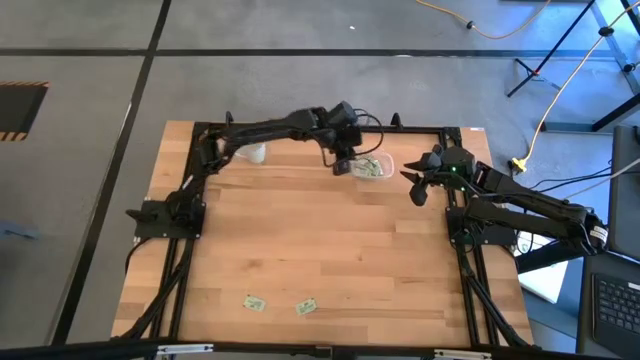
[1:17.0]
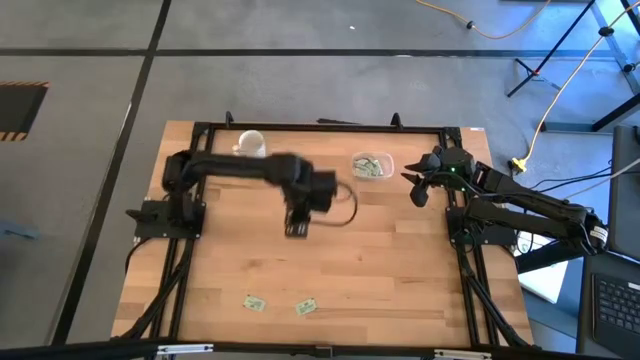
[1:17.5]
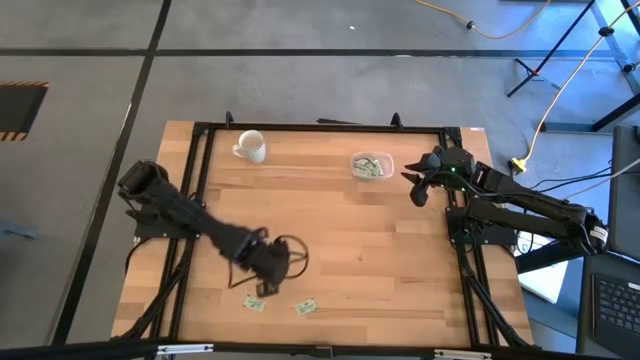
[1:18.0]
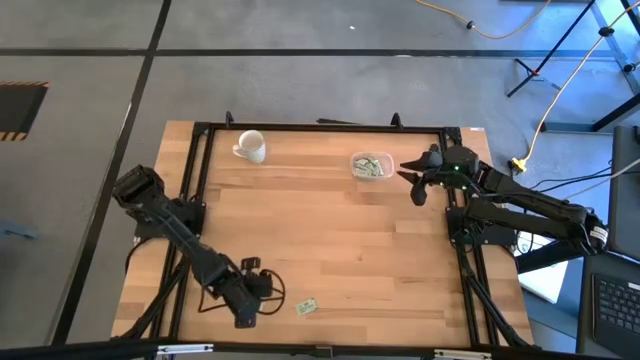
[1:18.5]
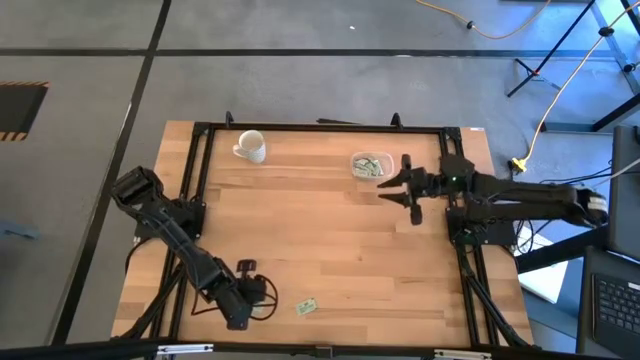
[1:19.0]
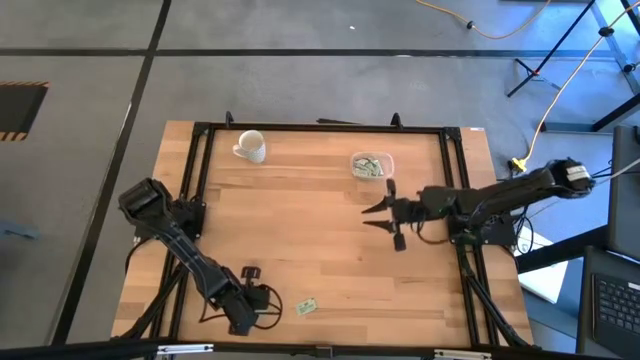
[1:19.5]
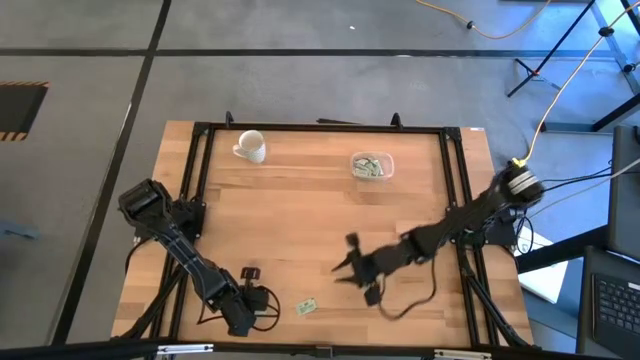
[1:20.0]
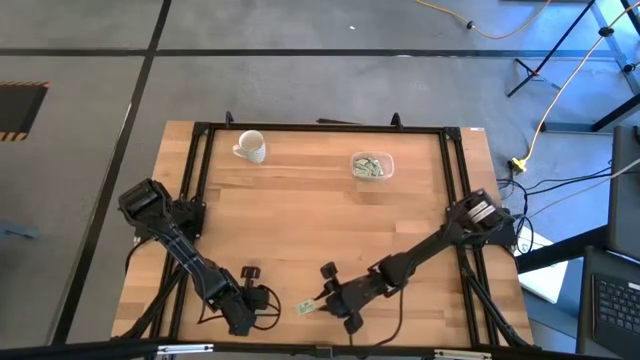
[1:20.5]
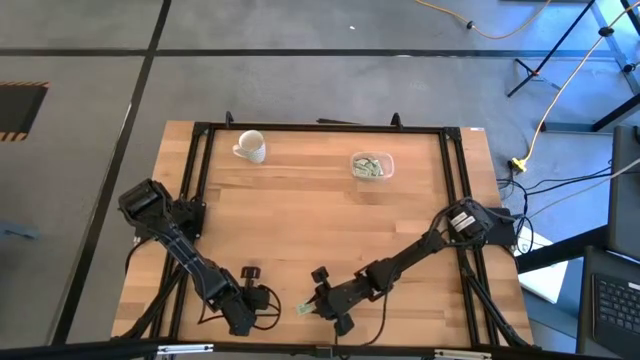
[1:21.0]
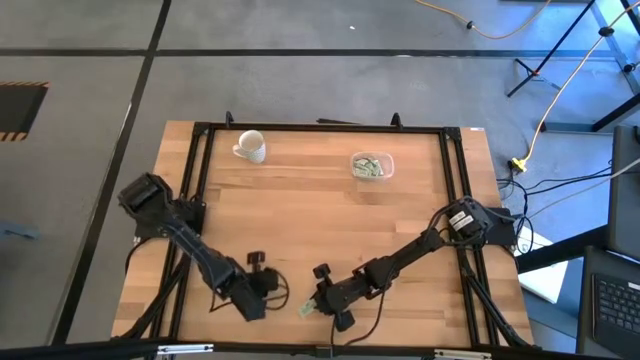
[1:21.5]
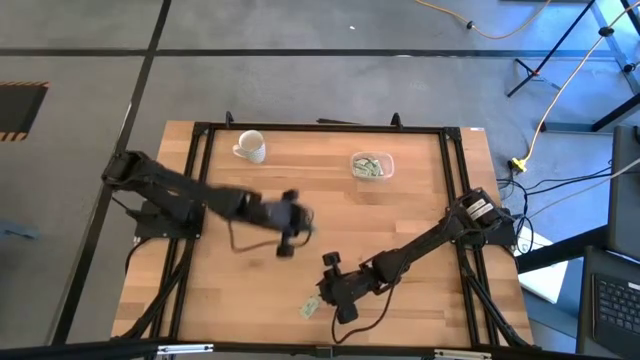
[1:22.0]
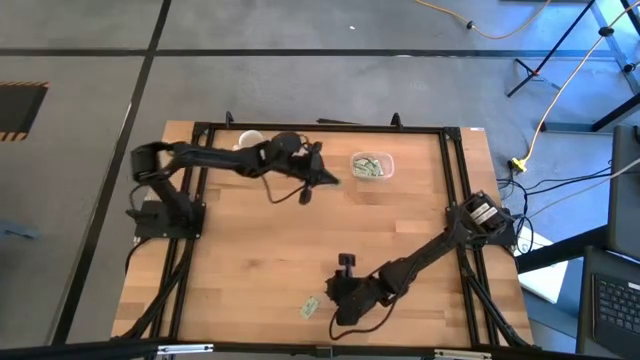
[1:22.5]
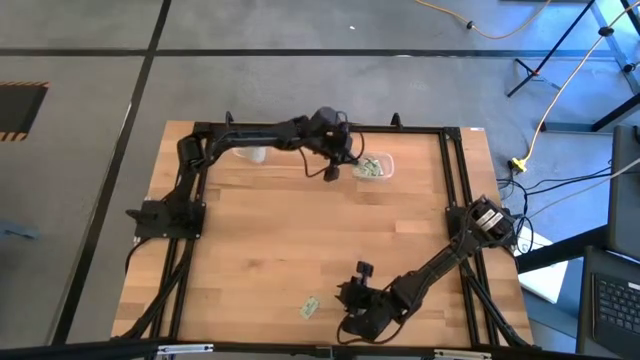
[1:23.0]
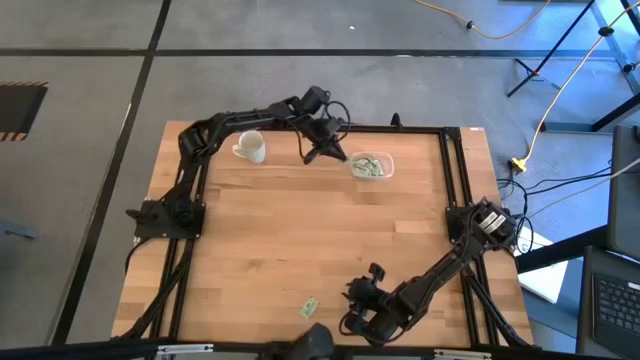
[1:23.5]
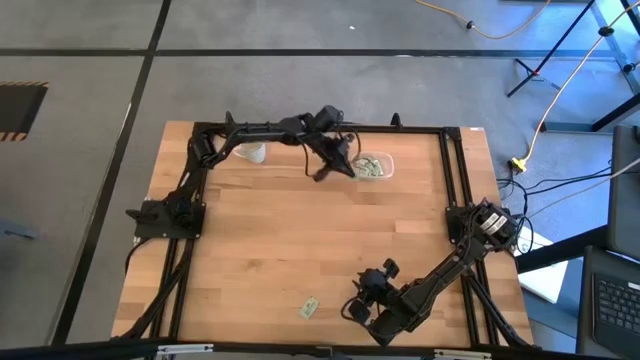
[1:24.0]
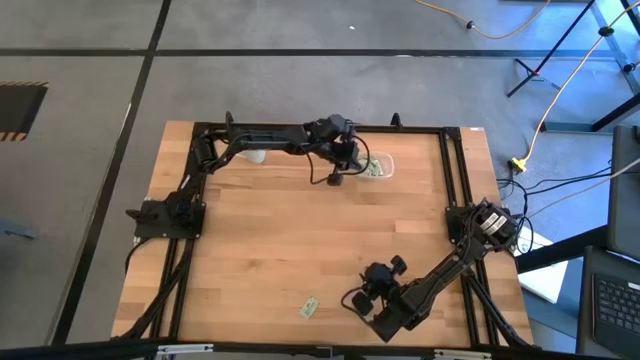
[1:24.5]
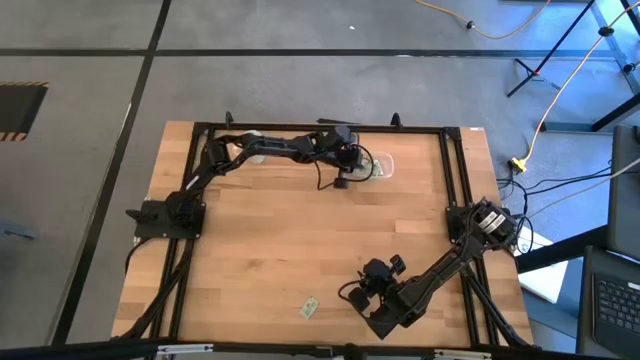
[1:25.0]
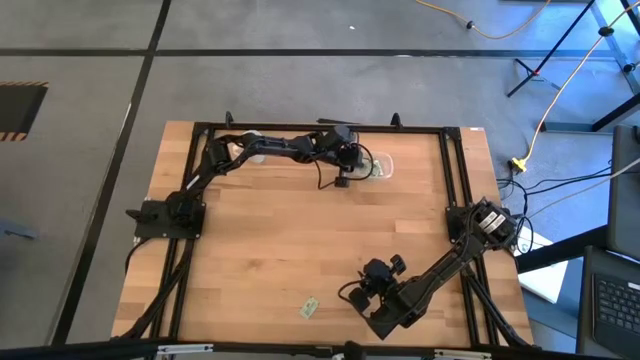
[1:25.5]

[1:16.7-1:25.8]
Task: Pick and place items into bin
Put the stevia packet into the transparent bin

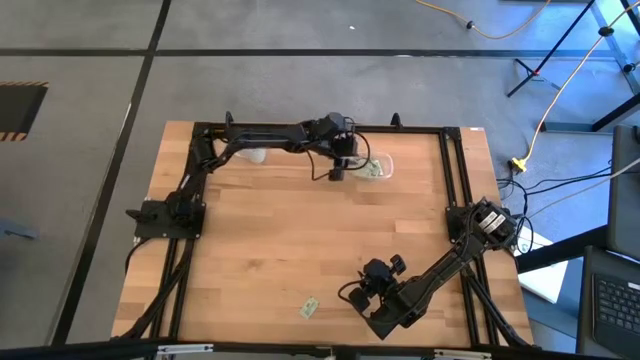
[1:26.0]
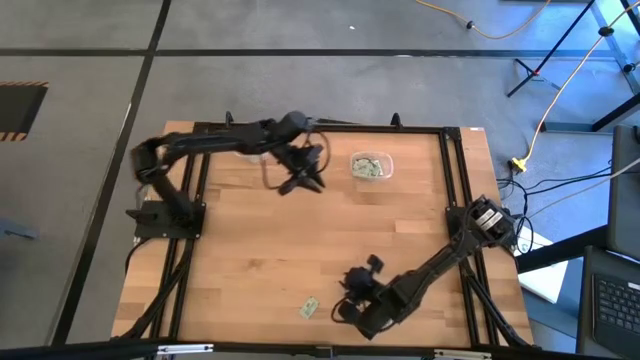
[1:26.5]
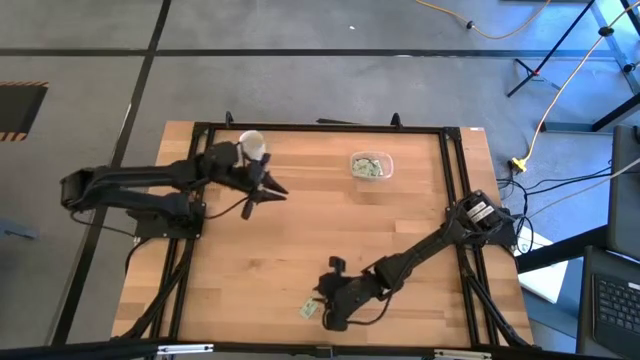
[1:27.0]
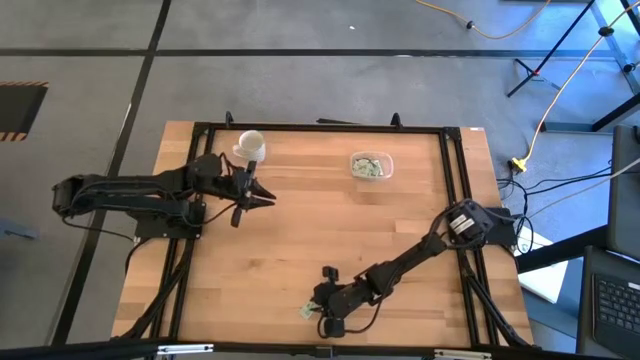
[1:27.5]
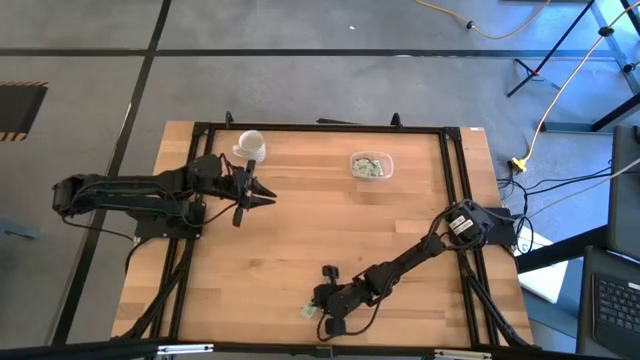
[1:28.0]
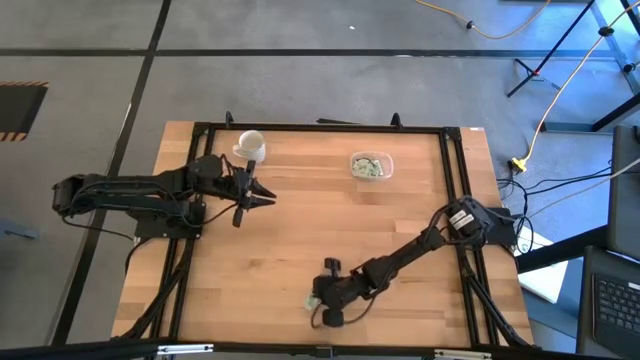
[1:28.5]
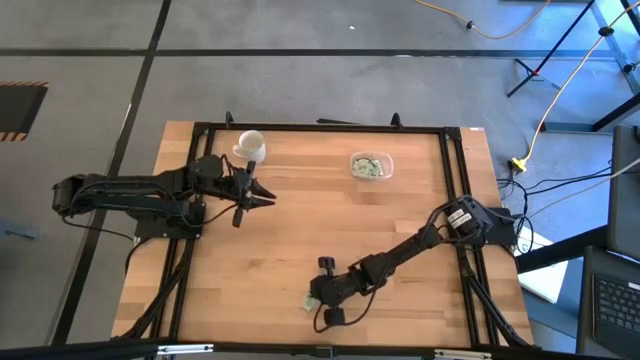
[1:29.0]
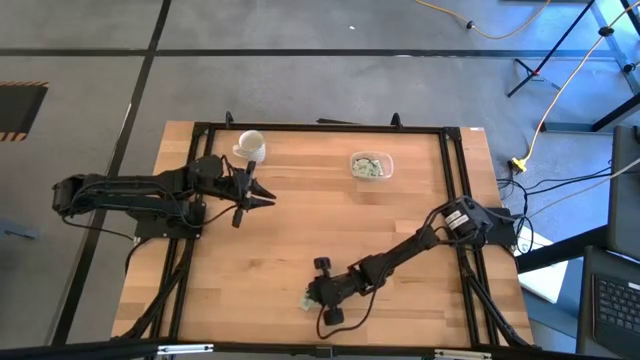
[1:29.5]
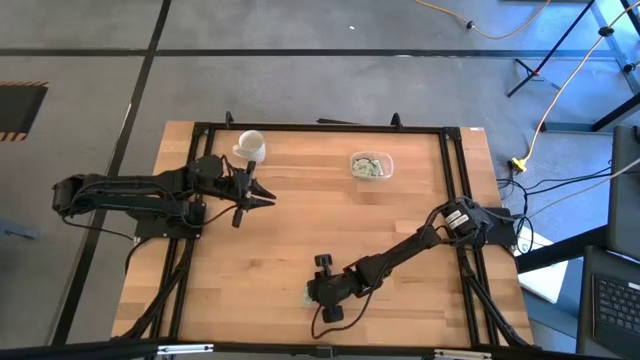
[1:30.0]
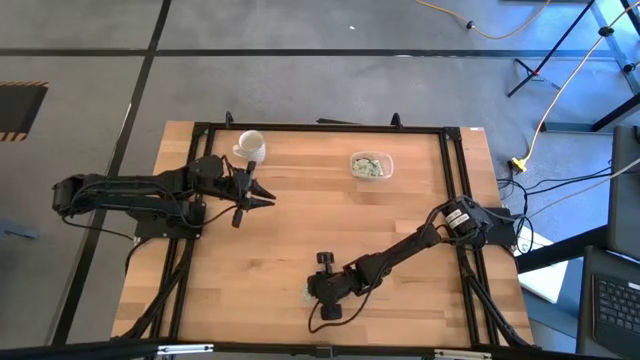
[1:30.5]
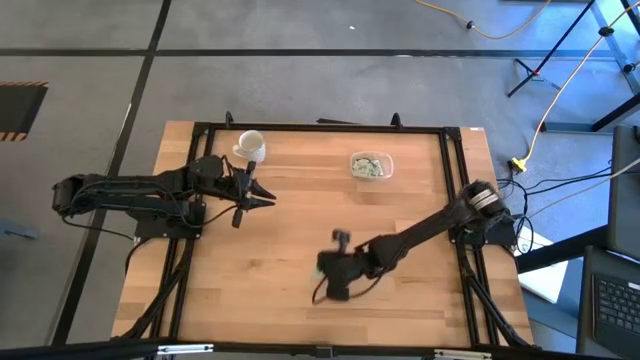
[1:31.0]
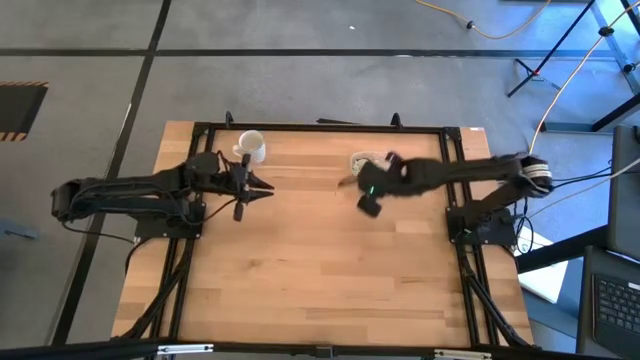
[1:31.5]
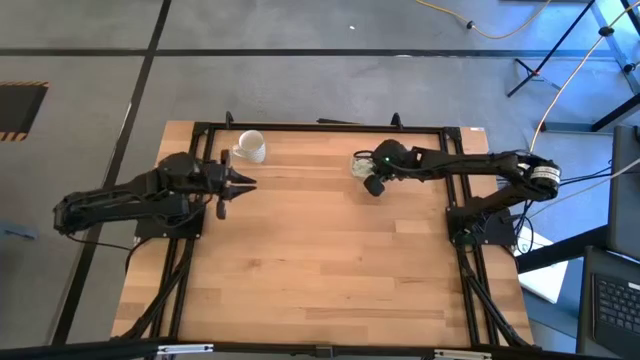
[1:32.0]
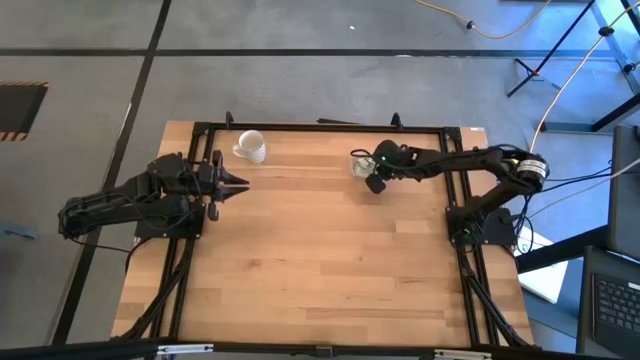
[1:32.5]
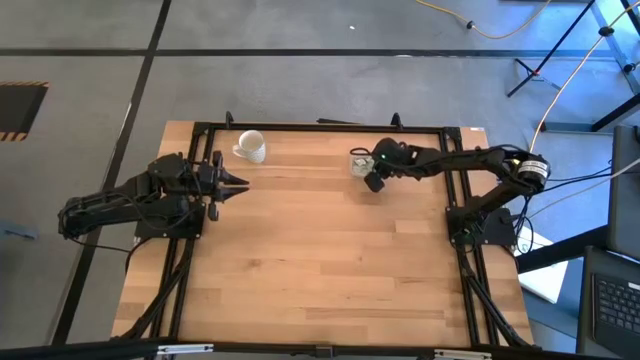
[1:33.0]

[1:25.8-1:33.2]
Put the stevia packet into the transparent bin

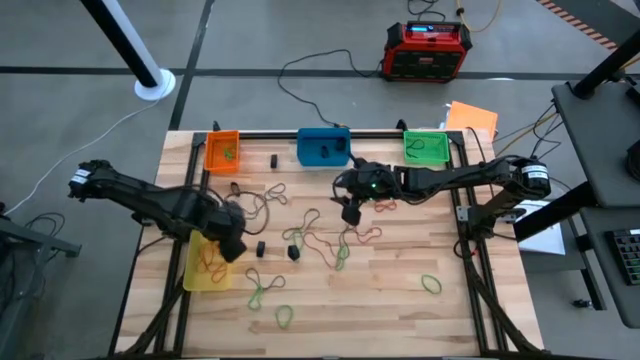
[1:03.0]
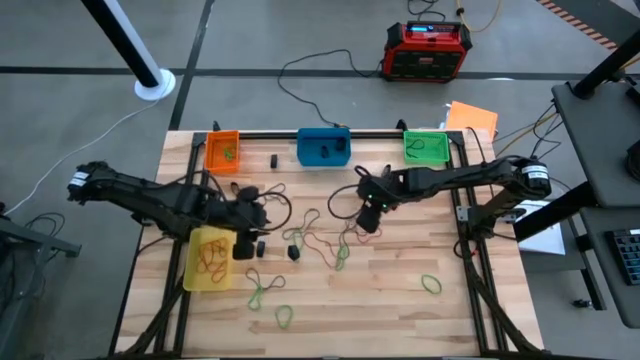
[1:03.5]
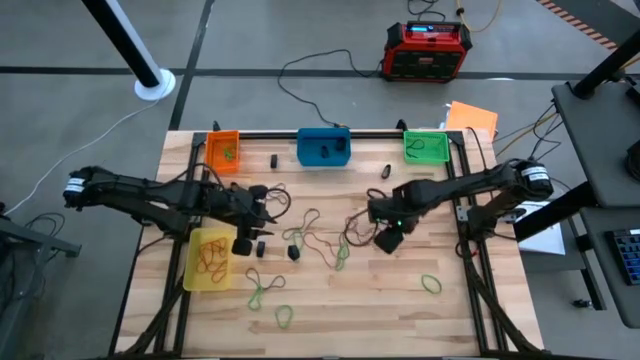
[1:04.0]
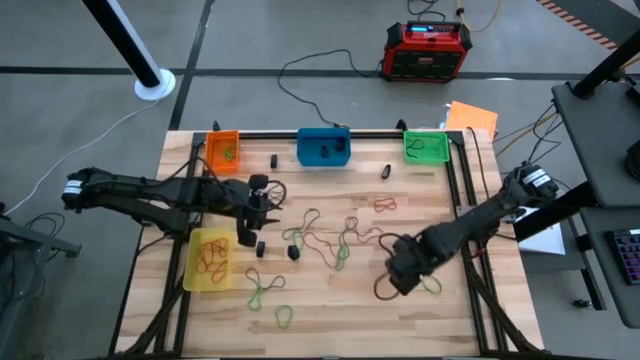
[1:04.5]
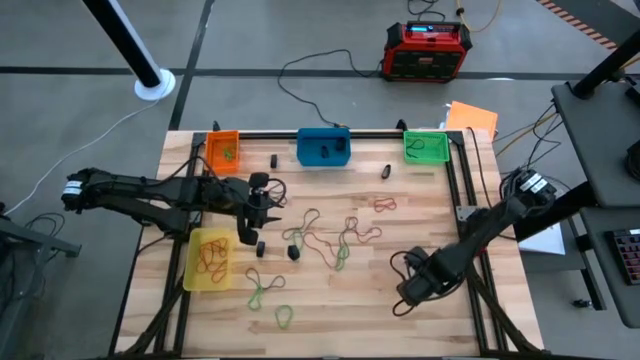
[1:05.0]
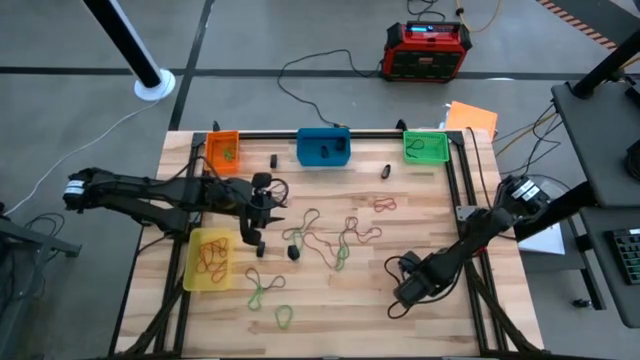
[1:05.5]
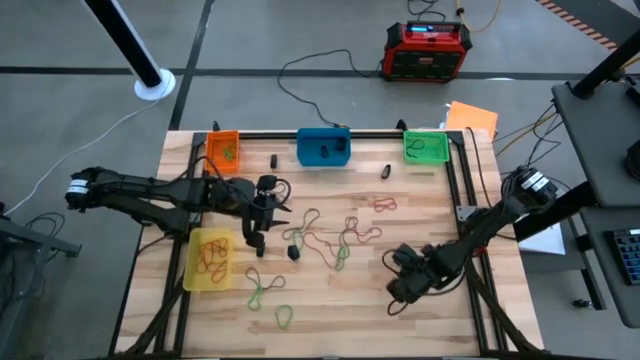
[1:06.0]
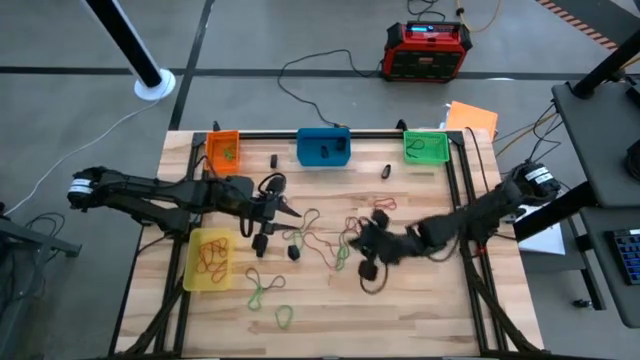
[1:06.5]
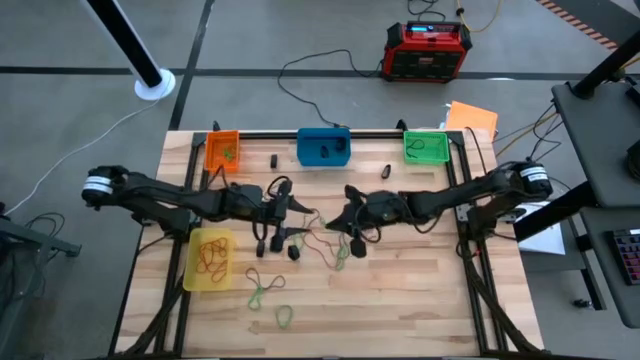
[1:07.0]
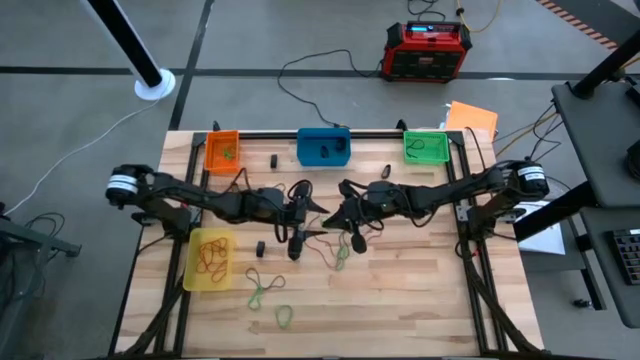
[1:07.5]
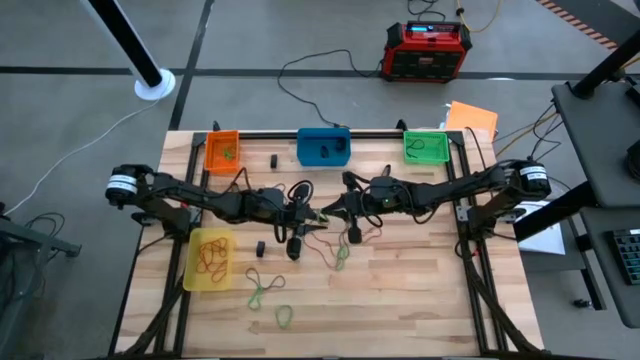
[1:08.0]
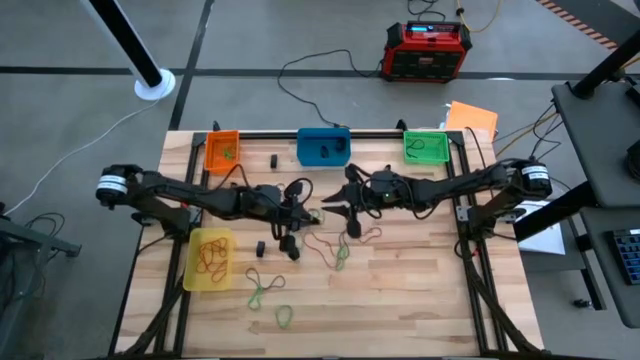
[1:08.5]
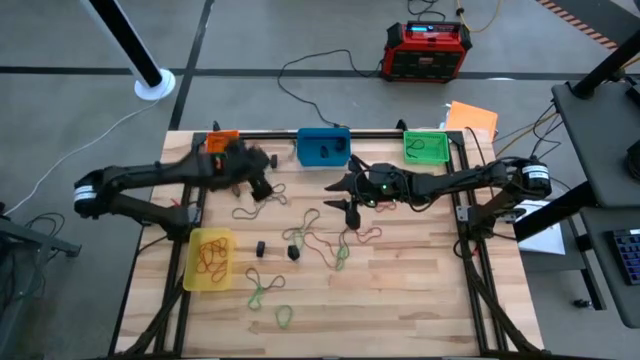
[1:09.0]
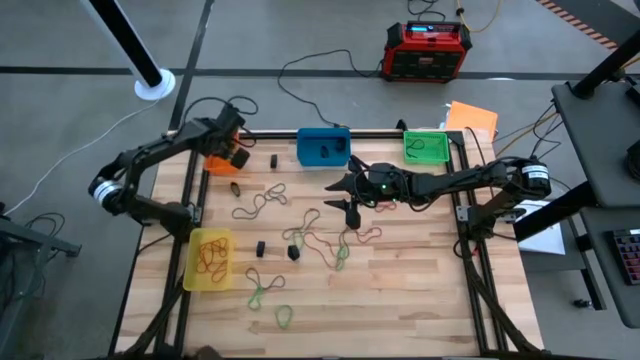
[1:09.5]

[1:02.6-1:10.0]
Task: Sort rubber bands into baskets
Put the green rubber band into the orange bin
